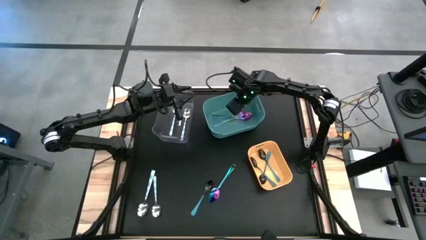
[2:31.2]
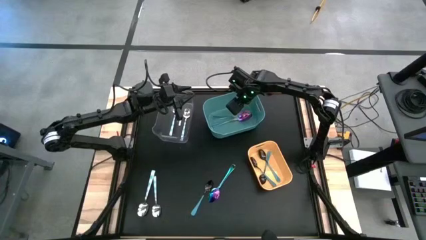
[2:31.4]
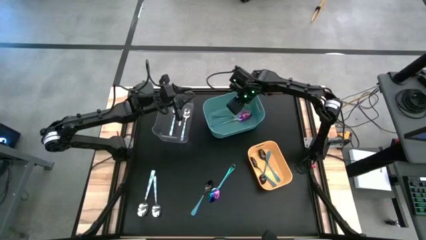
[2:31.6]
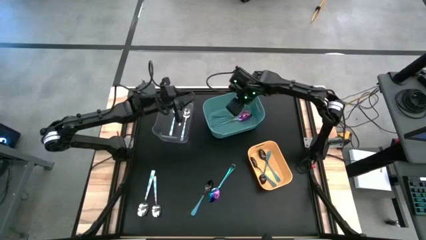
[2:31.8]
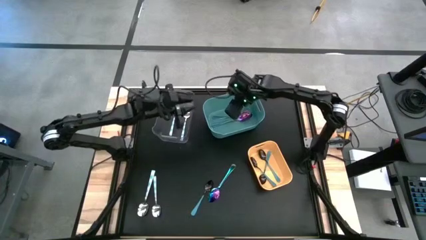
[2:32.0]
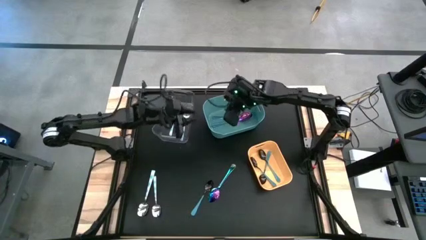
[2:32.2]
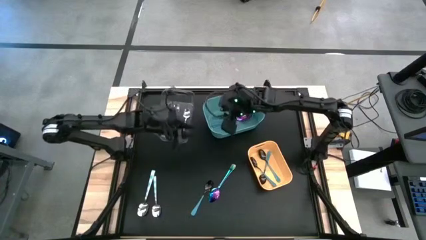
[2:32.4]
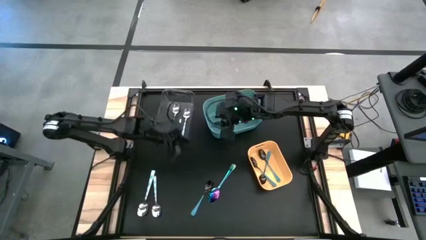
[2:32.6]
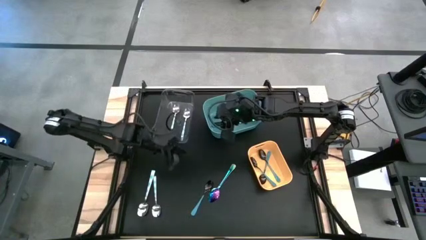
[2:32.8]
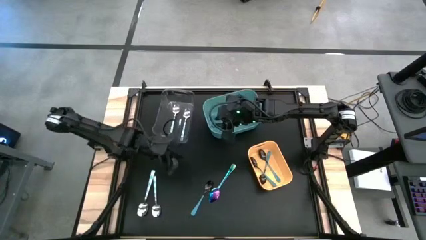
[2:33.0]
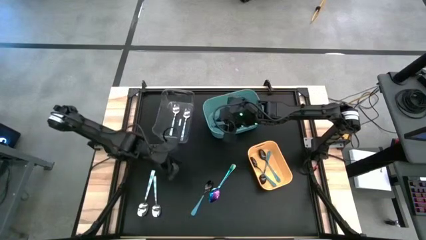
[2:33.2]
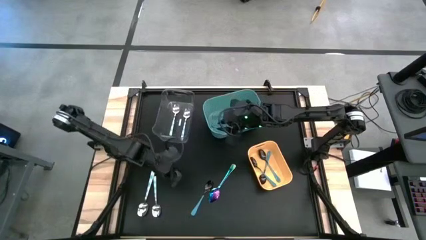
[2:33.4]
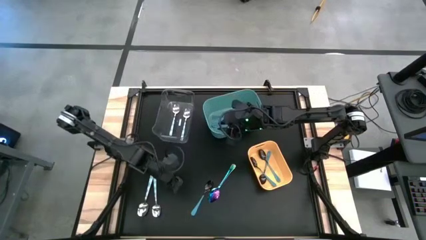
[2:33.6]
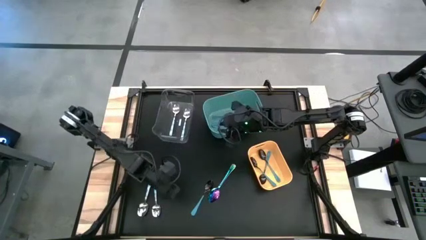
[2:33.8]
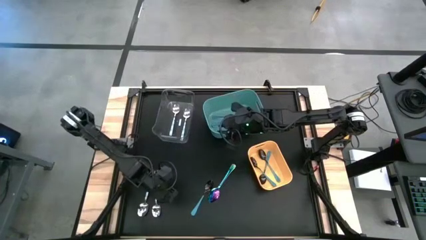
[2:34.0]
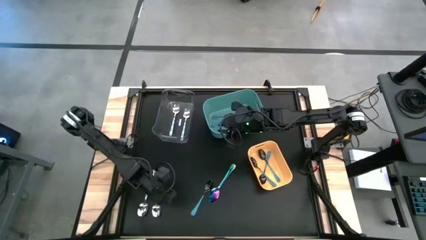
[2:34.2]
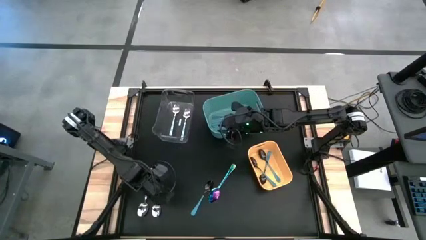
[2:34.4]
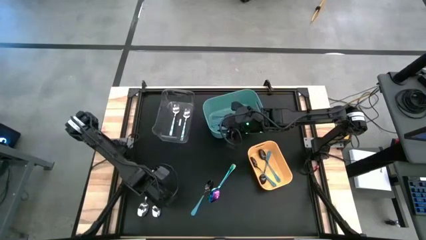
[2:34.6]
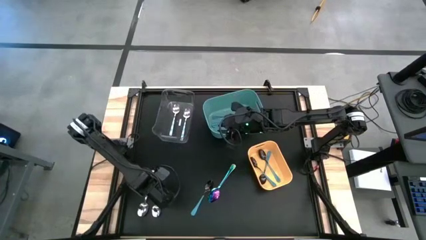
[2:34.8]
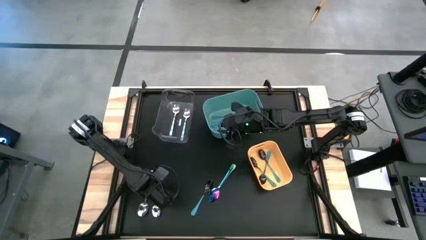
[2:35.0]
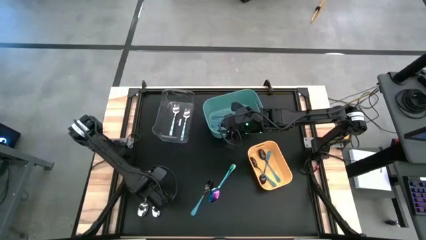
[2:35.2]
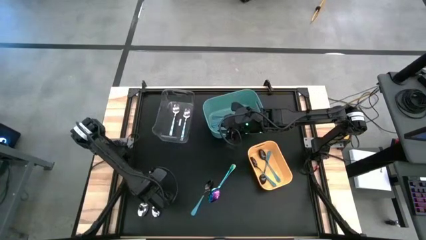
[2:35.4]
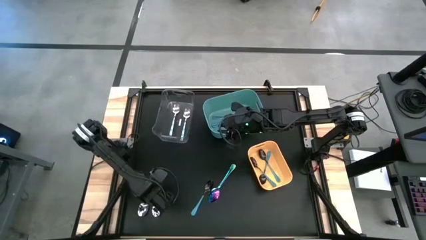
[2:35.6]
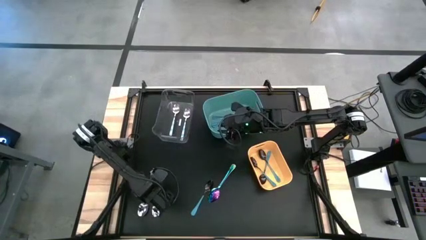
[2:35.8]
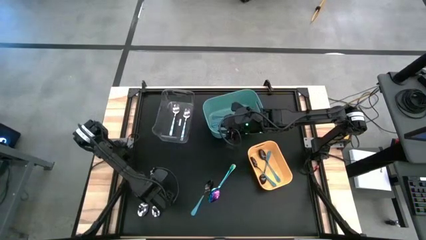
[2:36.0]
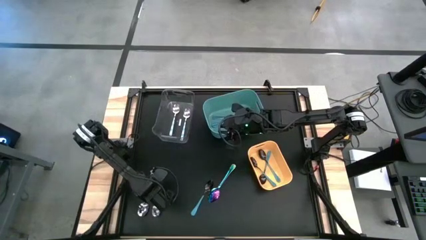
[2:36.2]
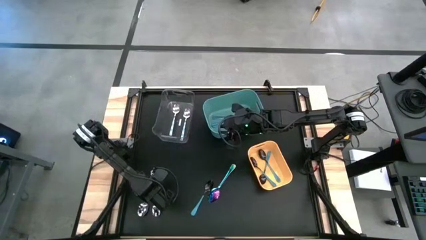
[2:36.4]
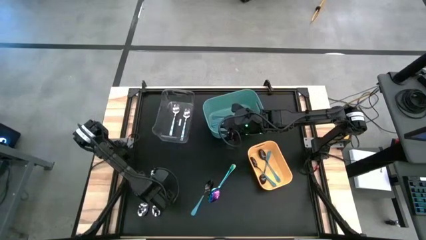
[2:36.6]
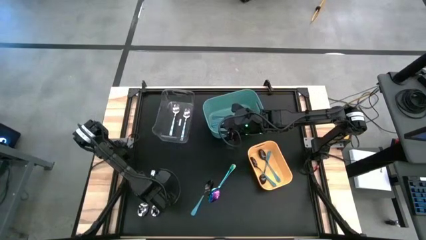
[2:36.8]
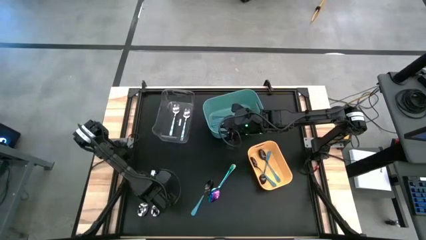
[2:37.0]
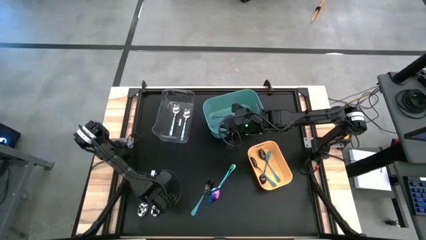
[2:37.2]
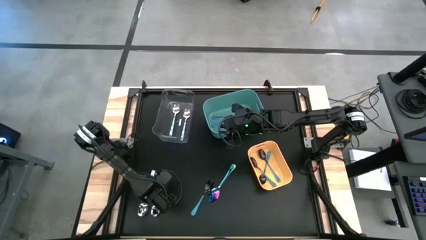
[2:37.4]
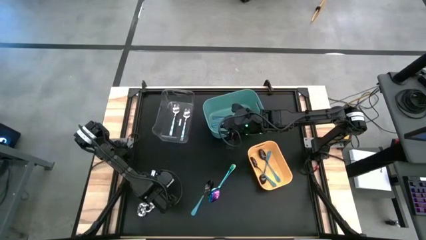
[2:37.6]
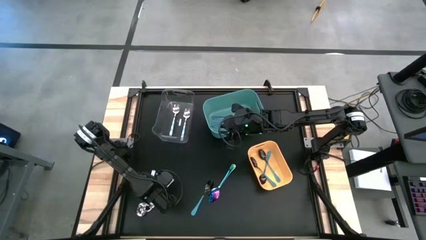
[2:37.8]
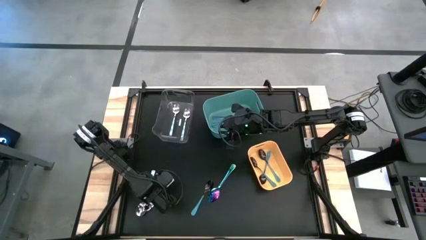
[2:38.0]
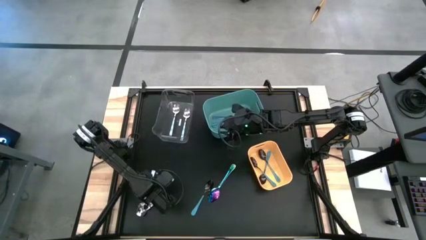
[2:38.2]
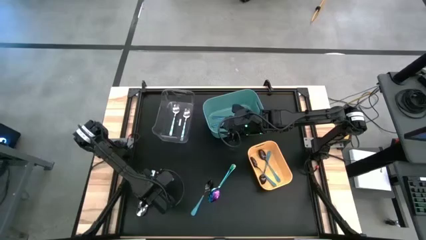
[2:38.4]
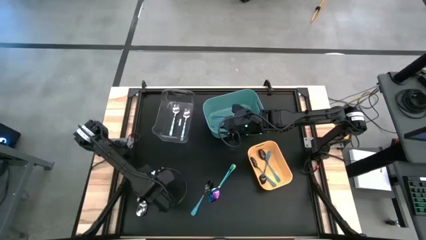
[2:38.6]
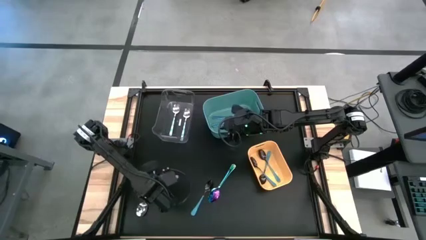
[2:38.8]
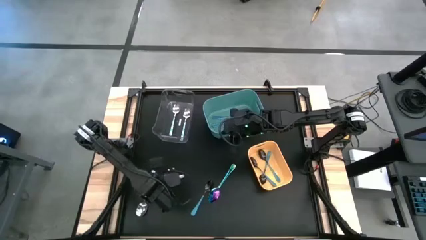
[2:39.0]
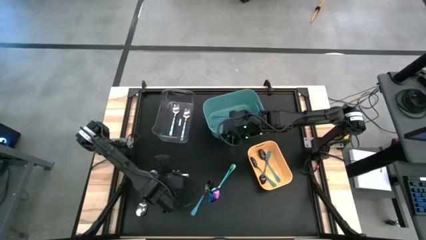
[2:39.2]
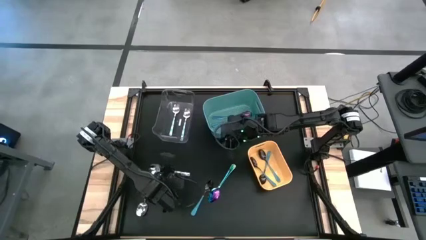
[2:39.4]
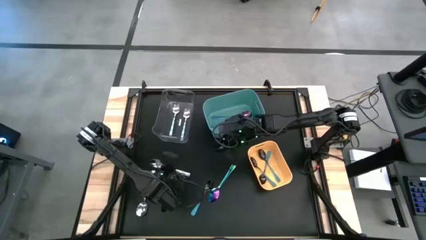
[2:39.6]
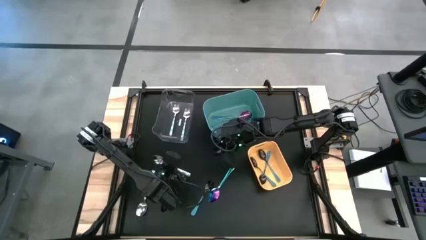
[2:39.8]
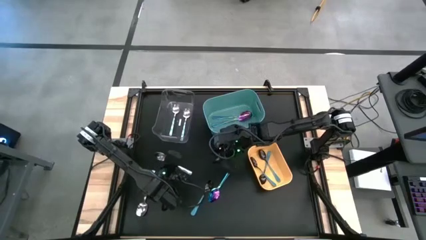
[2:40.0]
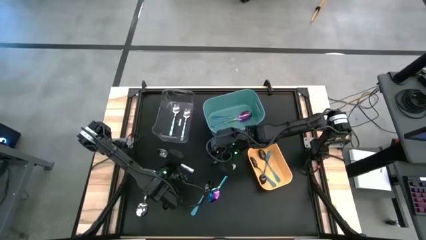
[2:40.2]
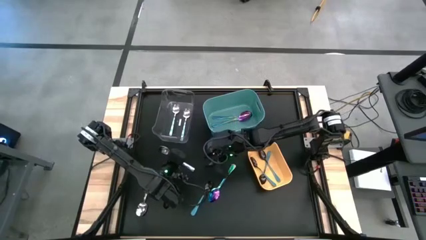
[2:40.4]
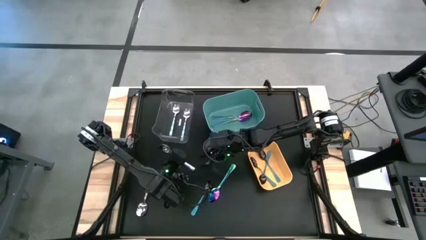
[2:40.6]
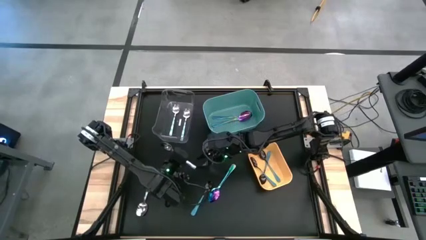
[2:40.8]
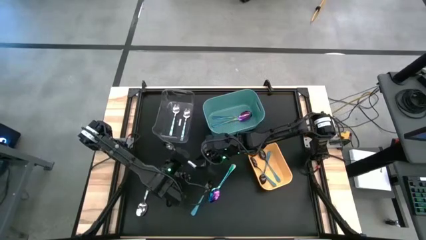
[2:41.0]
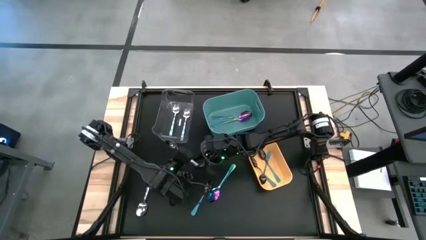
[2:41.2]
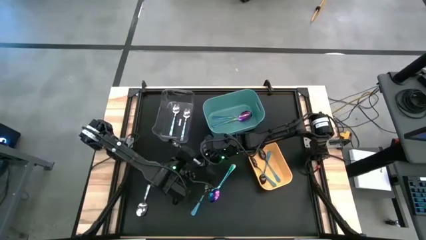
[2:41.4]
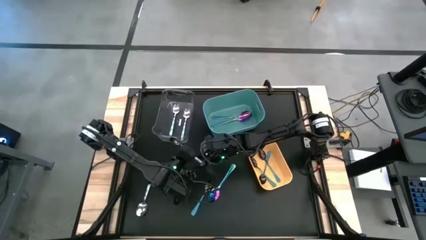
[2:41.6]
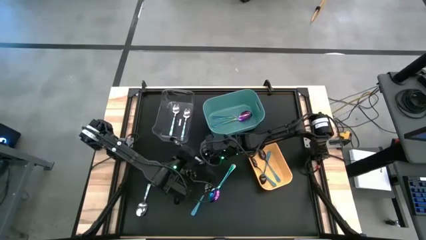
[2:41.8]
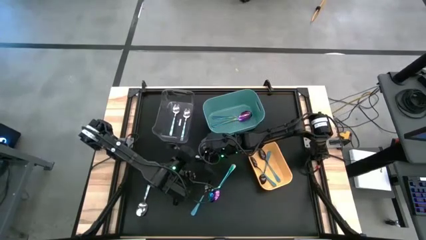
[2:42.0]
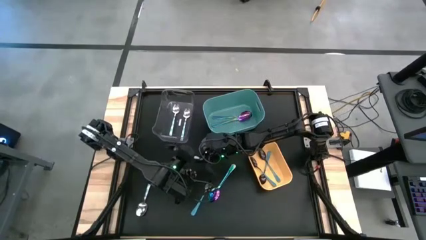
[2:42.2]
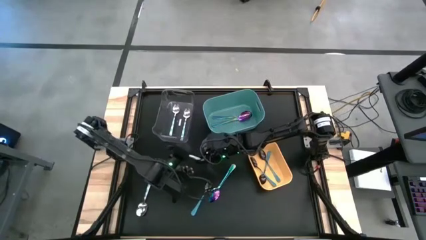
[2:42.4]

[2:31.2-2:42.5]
Task: Sort silverware by color (type)
Put the patterned blue spoon into the transparent bin

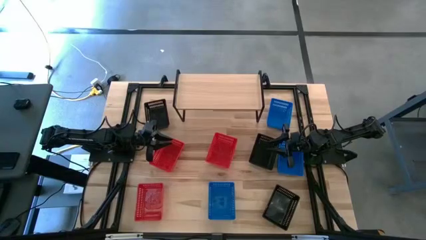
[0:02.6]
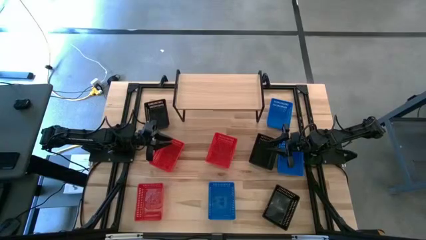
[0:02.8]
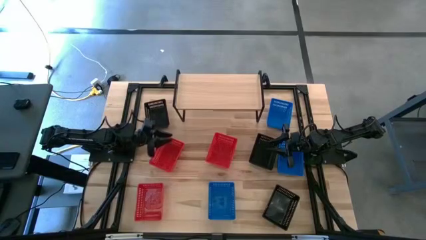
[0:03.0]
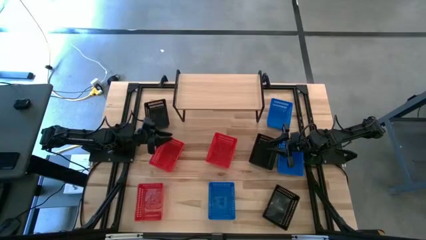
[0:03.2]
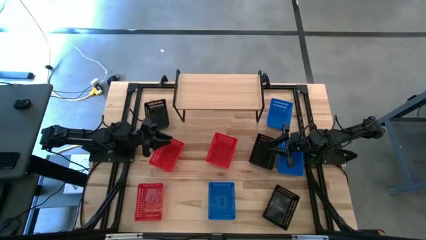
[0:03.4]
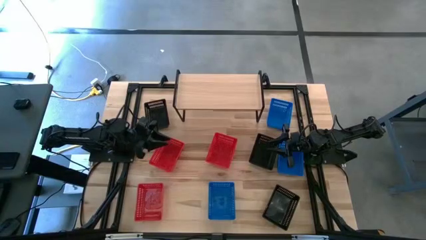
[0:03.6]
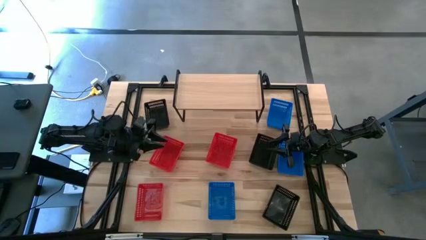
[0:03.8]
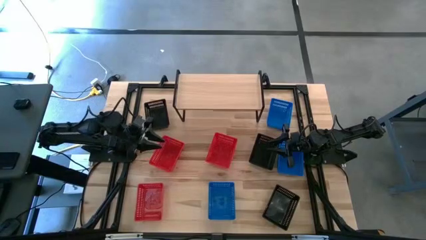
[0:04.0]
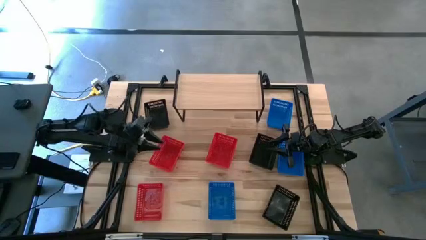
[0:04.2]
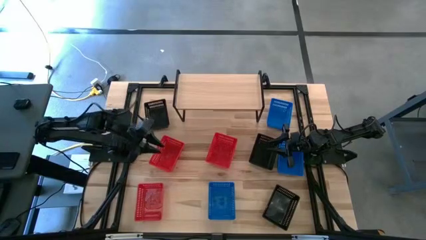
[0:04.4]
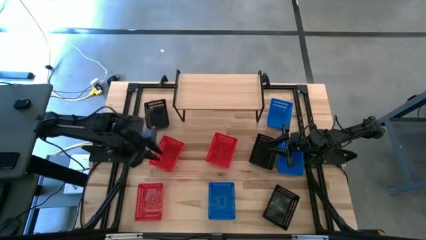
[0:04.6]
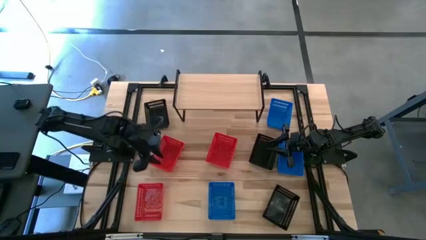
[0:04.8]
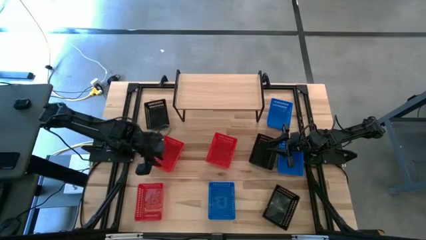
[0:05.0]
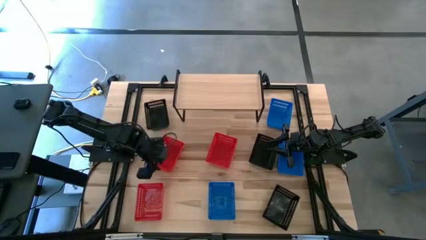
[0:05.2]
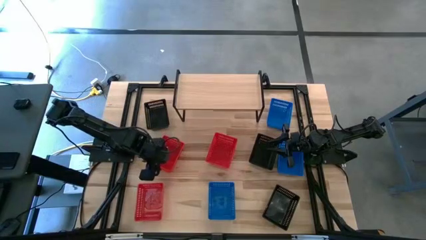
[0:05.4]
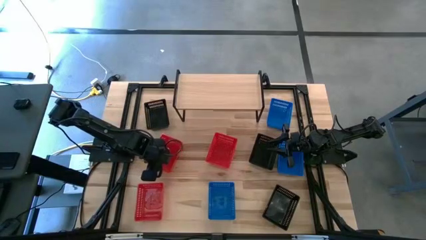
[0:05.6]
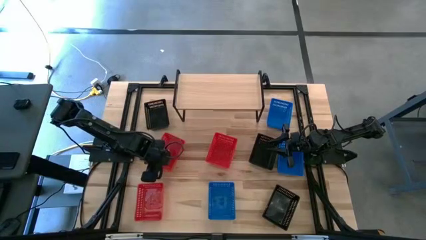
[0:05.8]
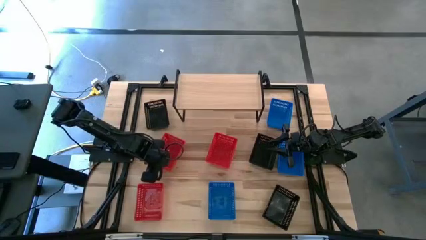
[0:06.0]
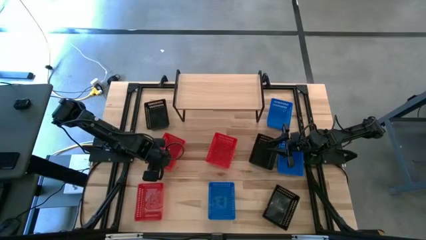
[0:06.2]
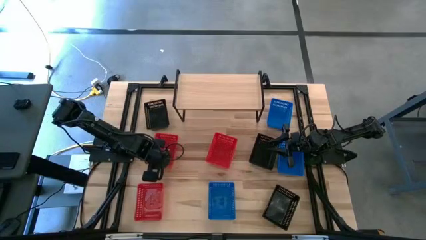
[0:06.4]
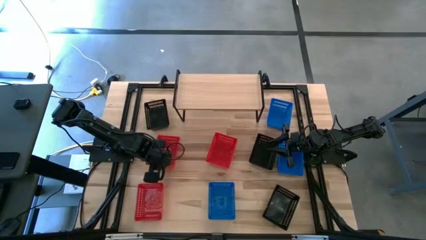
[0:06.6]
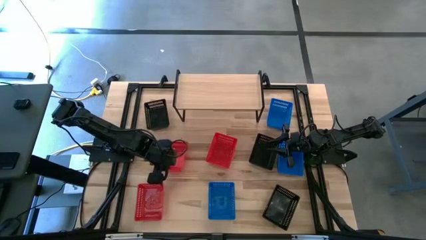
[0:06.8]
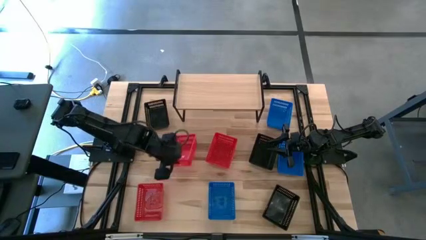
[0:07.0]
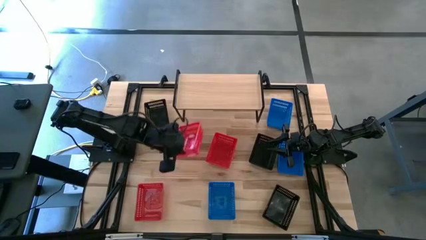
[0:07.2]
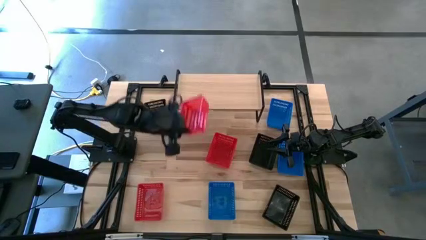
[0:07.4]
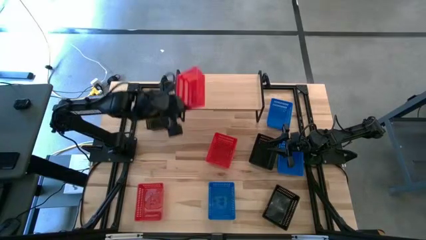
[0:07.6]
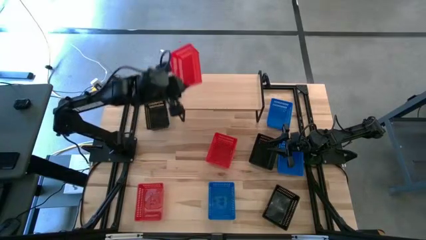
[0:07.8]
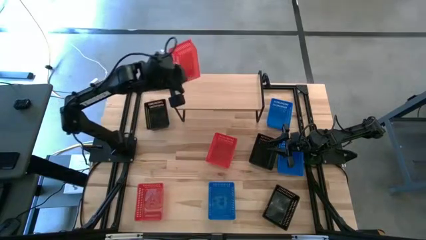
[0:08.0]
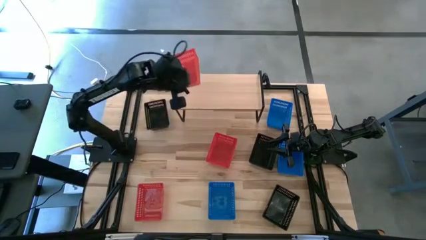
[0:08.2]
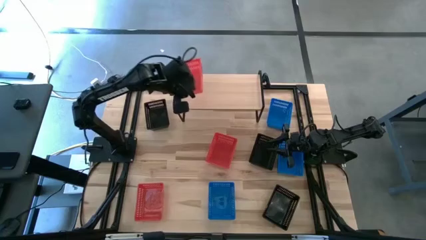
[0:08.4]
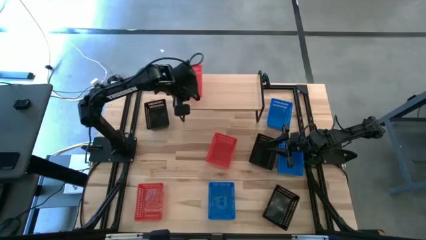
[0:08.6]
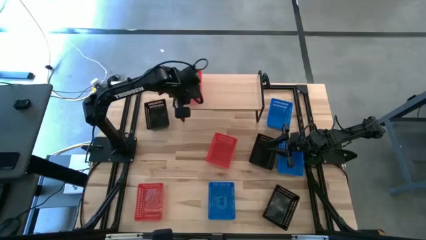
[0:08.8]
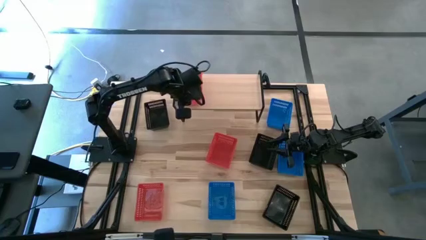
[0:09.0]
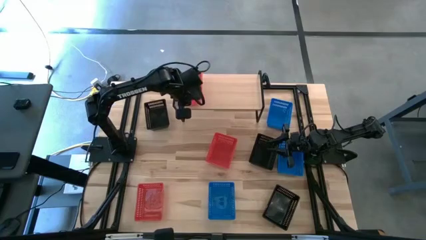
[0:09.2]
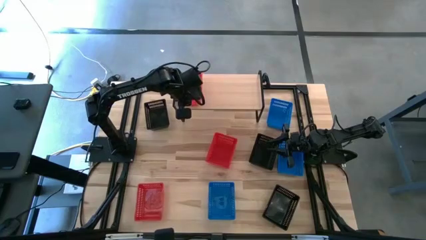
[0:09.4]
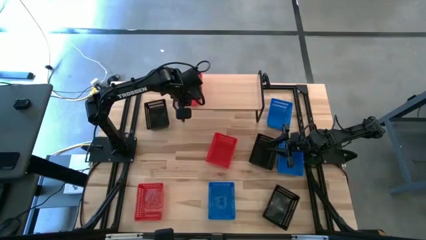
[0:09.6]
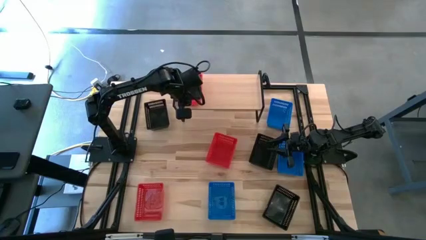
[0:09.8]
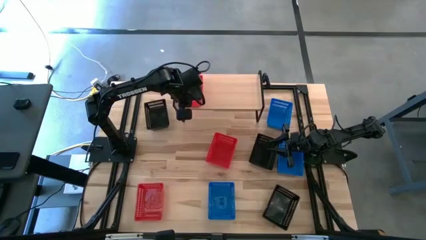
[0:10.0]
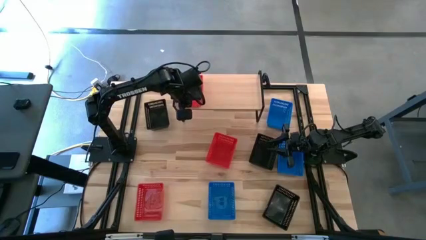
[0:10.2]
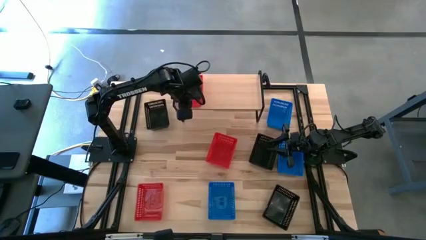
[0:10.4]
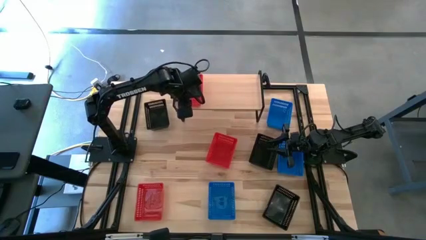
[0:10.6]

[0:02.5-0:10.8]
Task: Stack baskets on shelf by color
Put the top left red basket on the shelf
